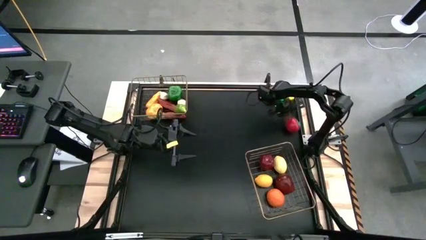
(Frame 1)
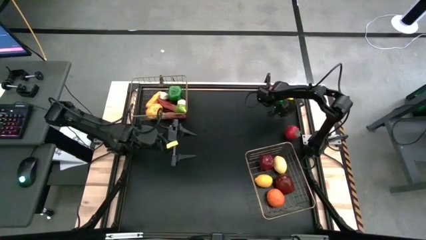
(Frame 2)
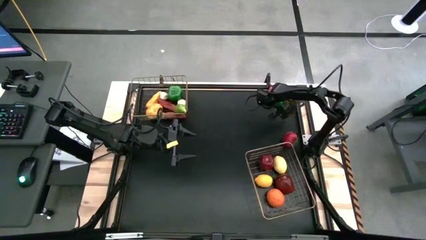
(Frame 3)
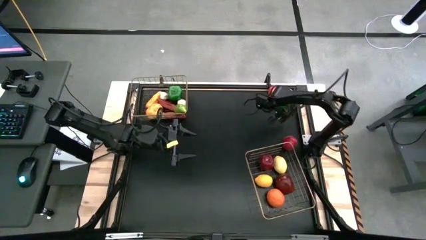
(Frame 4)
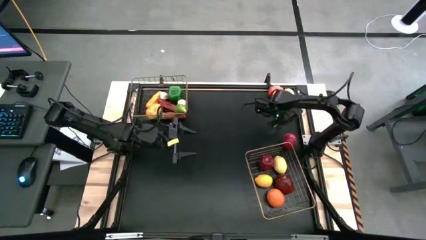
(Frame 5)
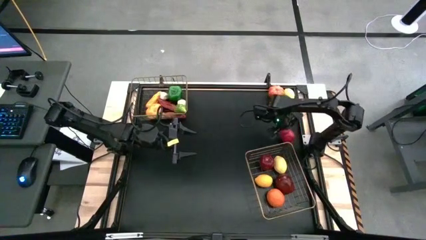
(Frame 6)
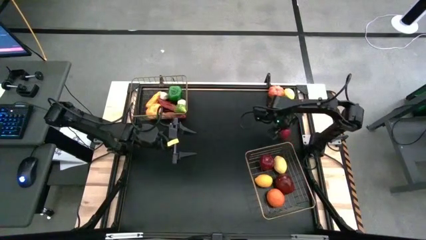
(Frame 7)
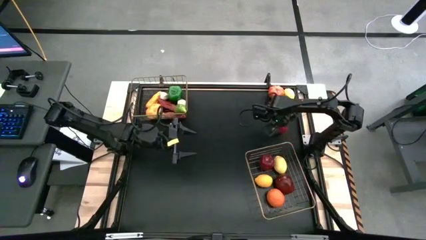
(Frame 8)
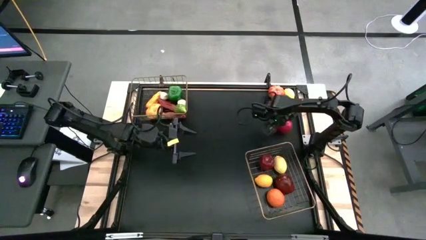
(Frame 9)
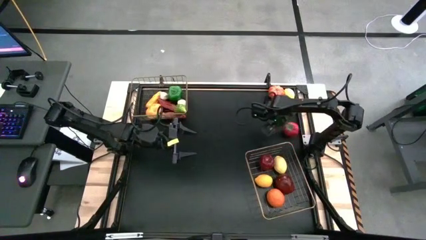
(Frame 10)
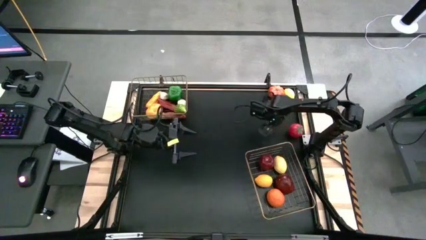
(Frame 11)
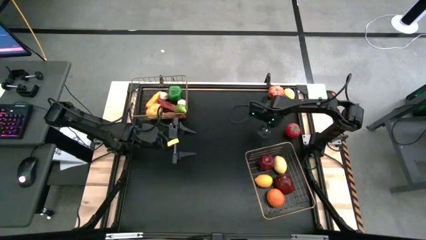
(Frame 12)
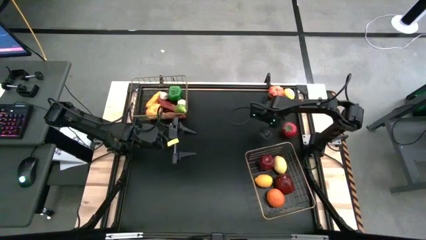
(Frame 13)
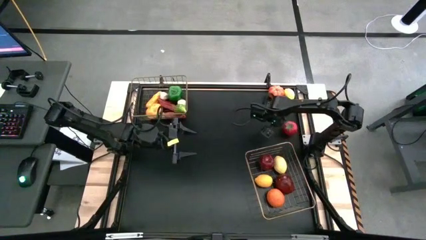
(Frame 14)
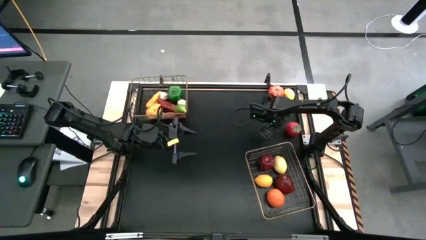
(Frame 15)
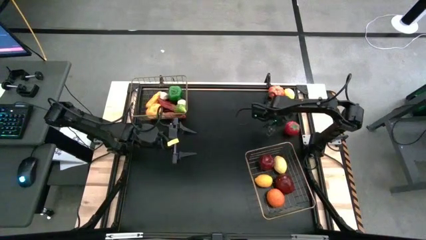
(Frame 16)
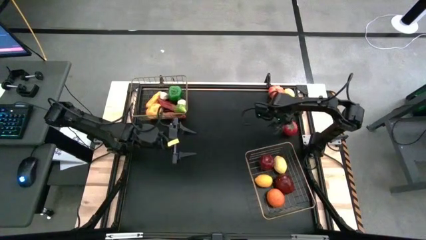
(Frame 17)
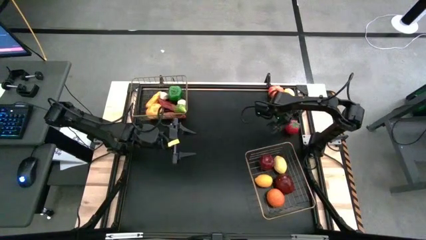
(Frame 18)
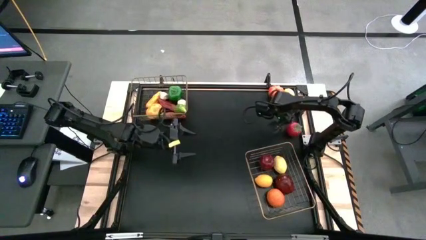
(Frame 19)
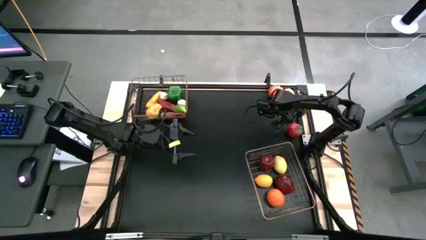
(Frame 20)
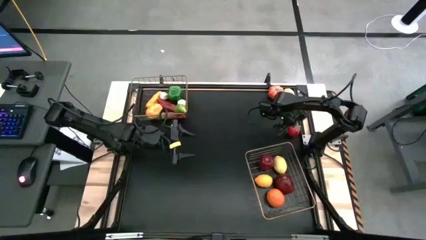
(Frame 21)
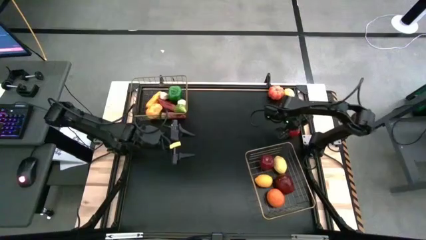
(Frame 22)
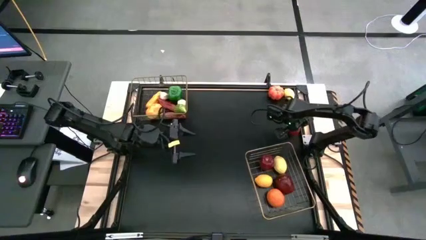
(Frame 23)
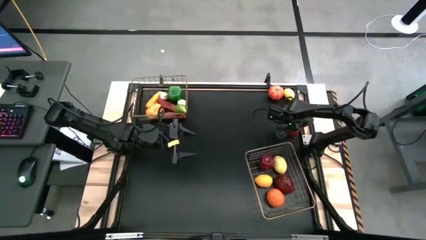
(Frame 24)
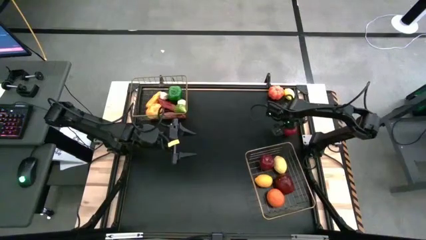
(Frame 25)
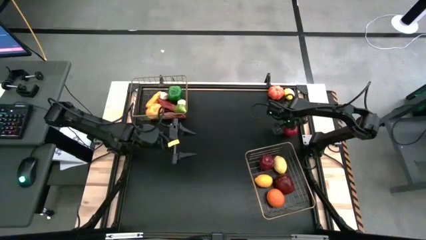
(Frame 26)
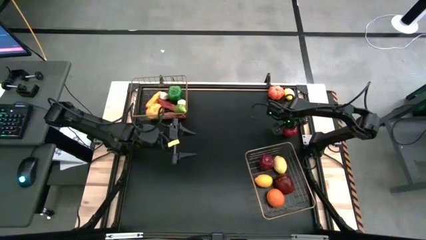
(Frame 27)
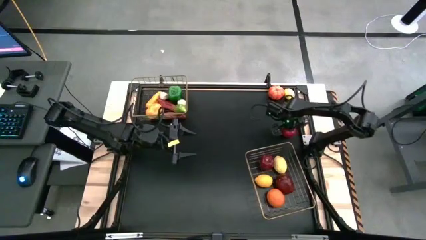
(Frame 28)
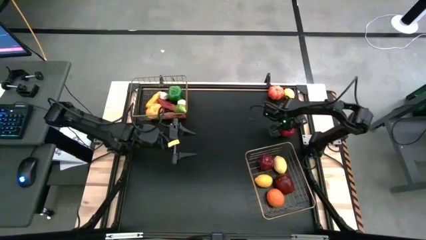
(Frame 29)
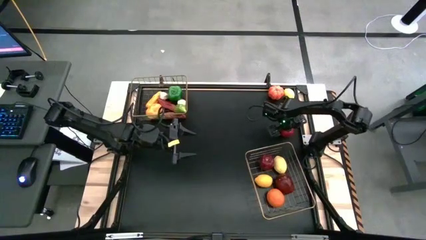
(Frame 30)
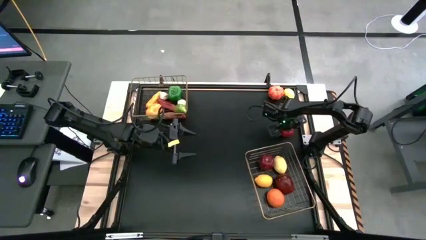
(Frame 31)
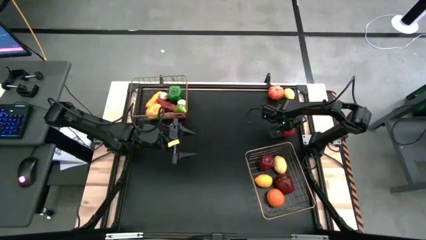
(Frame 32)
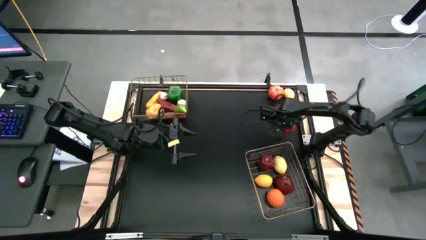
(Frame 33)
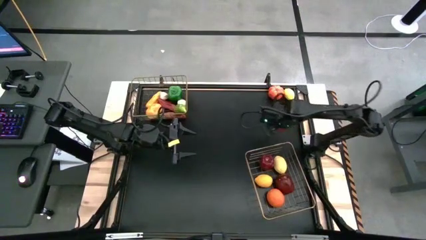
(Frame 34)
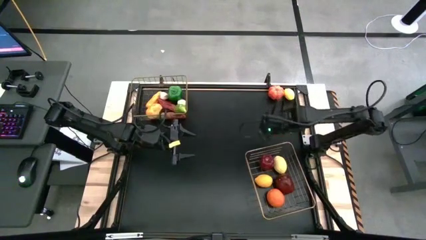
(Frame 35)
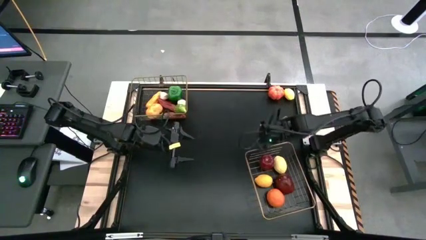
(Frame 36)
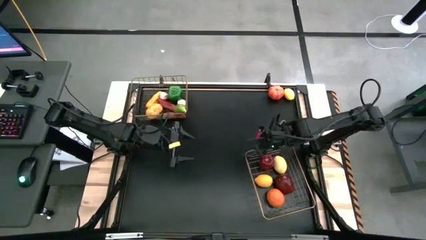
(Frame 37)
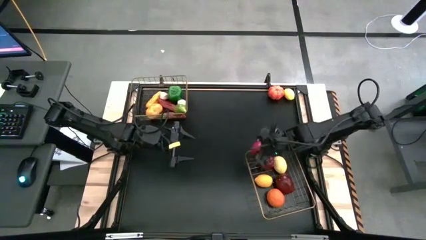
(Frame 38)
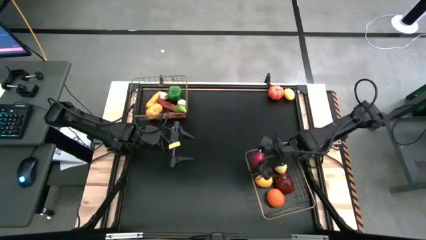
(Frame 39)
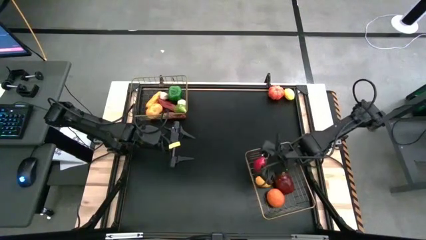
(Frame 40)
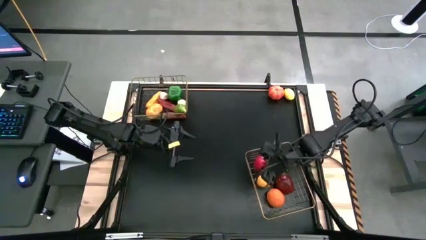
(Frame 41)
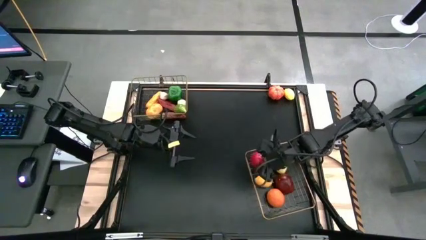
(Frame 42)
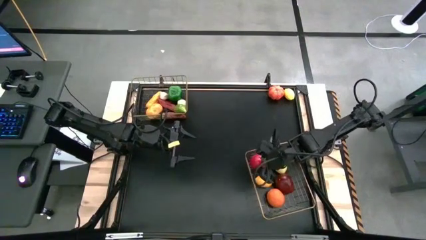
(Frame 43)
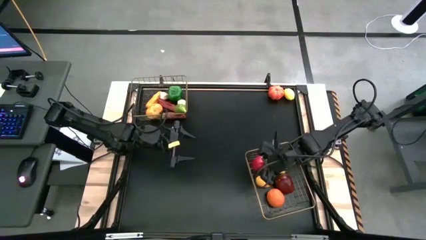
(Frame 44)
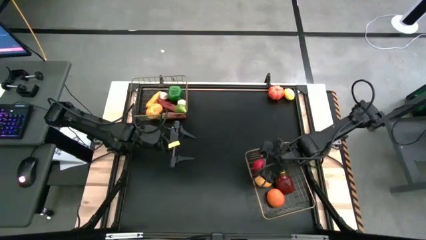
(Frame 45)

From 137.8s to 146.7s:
Task: Sort produce into baskets
Put the red tomato into the bottom wire basket

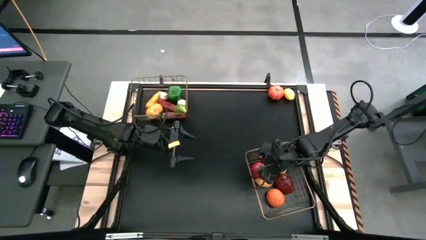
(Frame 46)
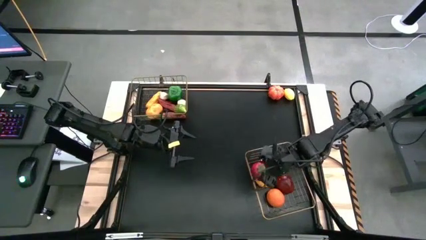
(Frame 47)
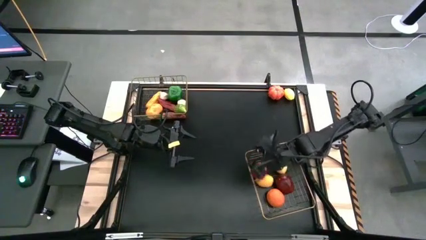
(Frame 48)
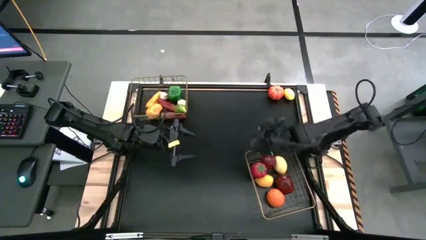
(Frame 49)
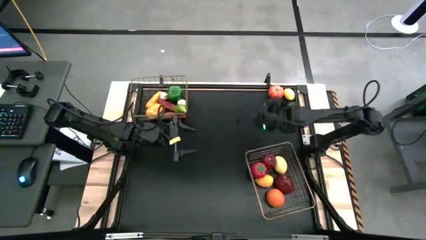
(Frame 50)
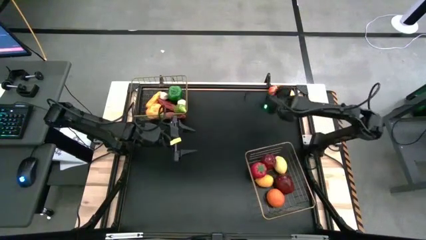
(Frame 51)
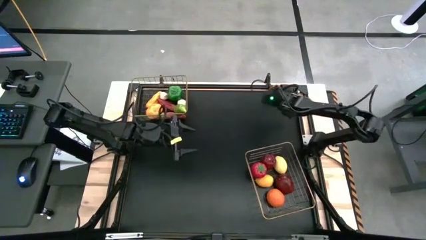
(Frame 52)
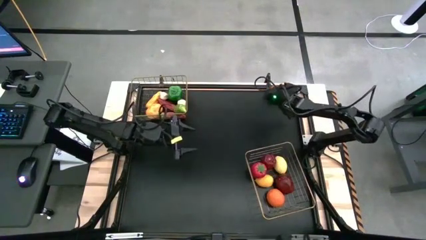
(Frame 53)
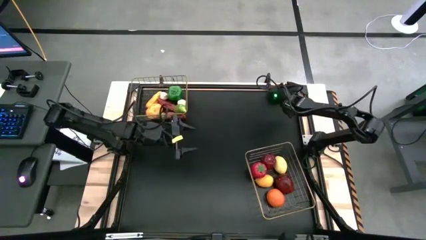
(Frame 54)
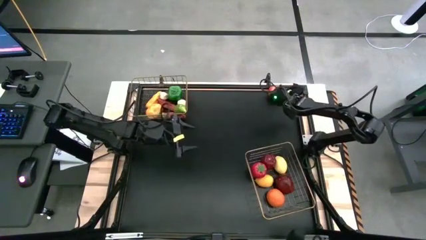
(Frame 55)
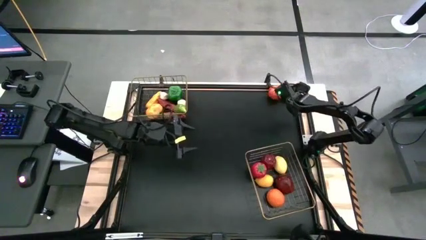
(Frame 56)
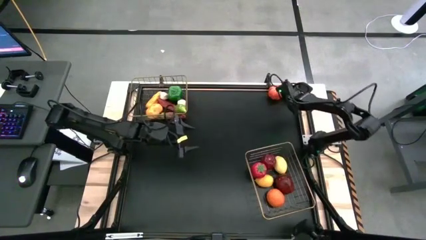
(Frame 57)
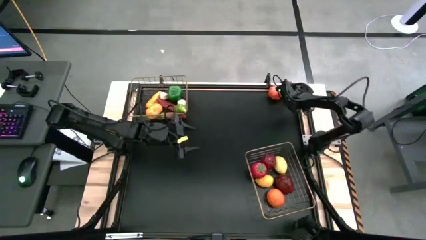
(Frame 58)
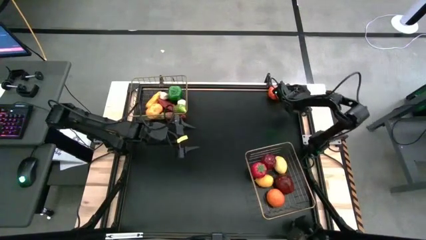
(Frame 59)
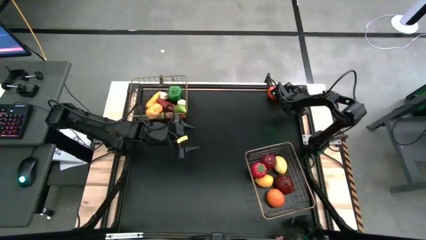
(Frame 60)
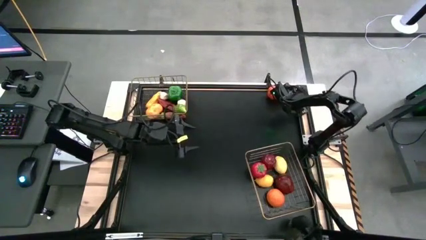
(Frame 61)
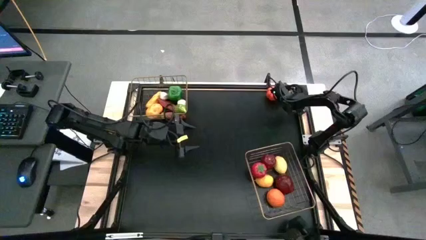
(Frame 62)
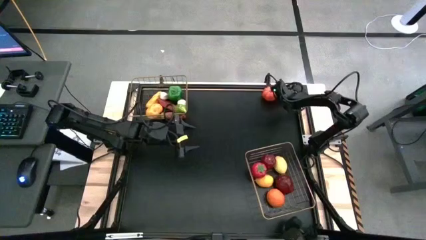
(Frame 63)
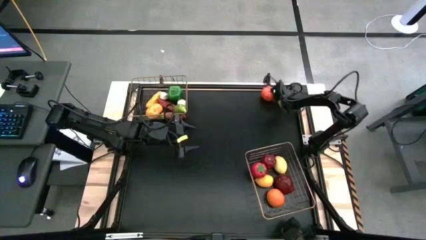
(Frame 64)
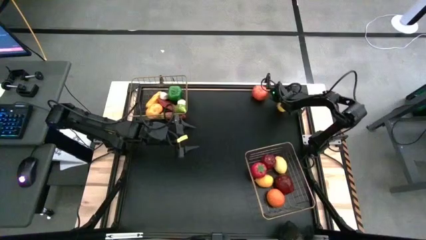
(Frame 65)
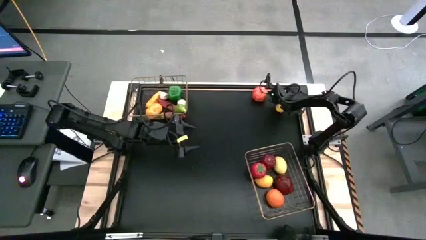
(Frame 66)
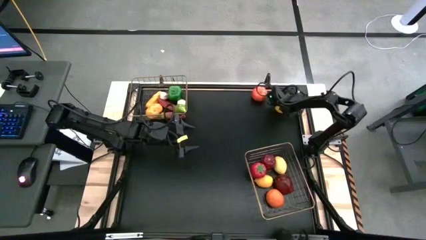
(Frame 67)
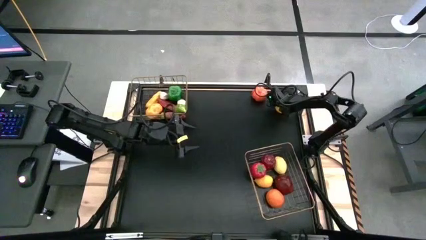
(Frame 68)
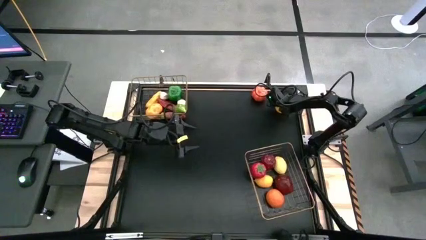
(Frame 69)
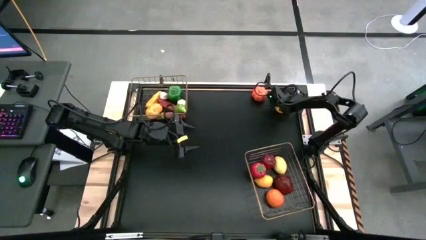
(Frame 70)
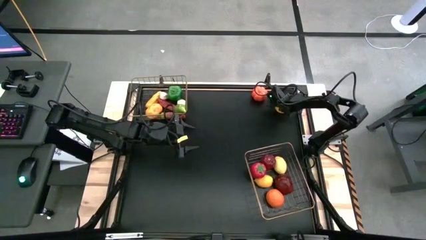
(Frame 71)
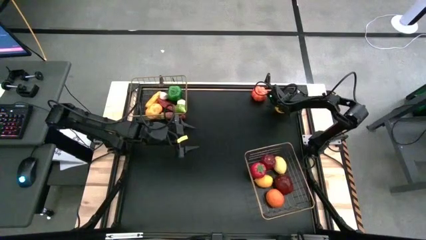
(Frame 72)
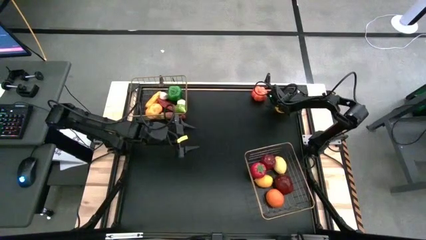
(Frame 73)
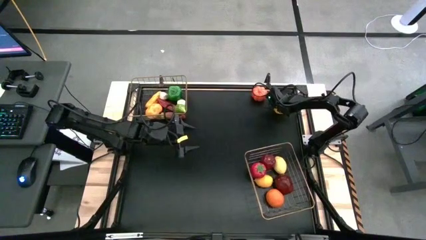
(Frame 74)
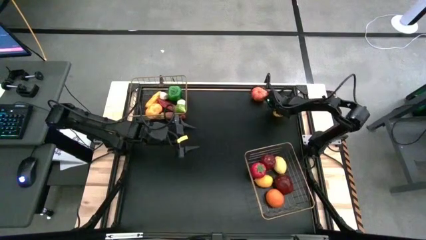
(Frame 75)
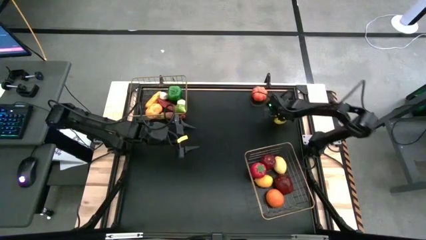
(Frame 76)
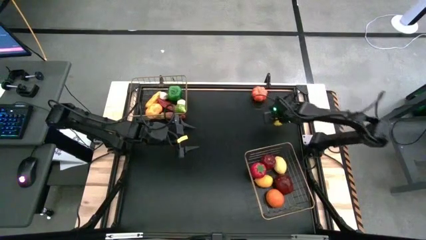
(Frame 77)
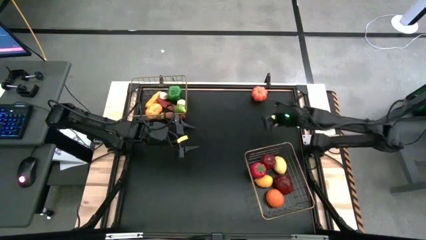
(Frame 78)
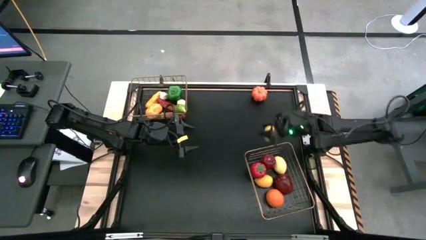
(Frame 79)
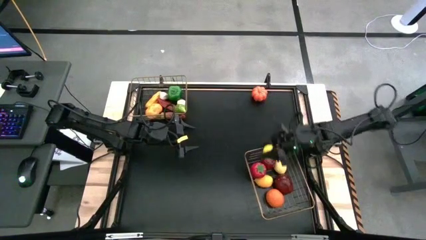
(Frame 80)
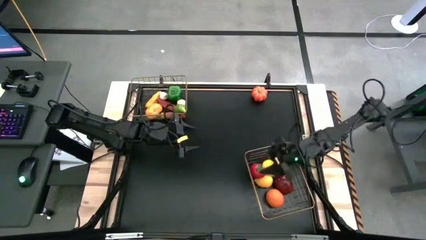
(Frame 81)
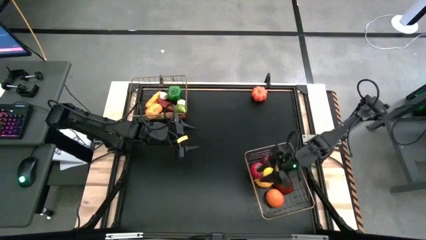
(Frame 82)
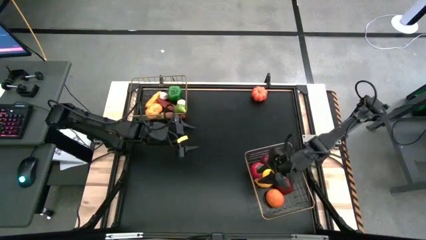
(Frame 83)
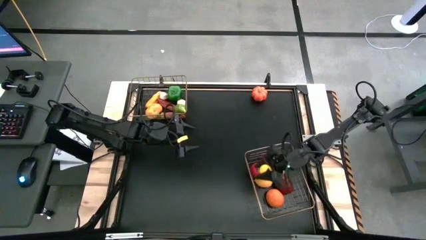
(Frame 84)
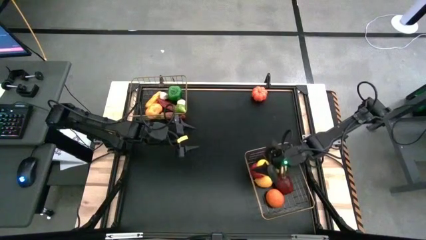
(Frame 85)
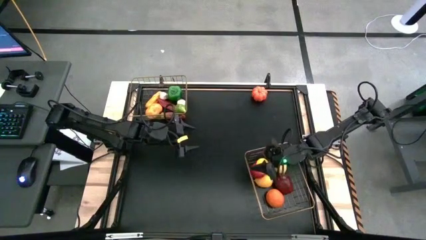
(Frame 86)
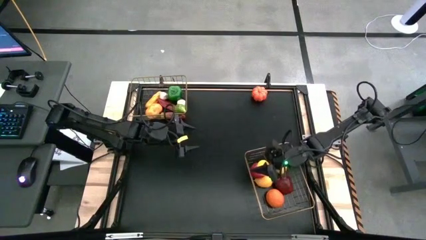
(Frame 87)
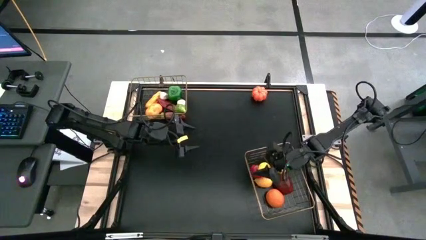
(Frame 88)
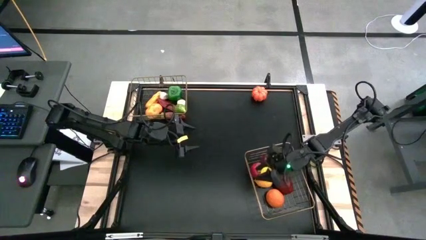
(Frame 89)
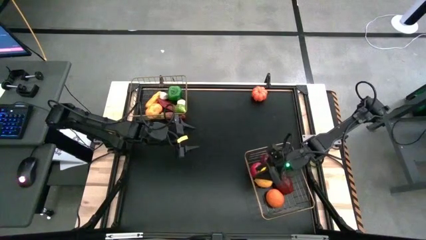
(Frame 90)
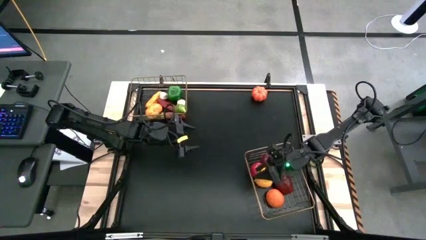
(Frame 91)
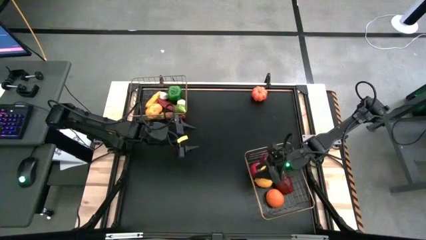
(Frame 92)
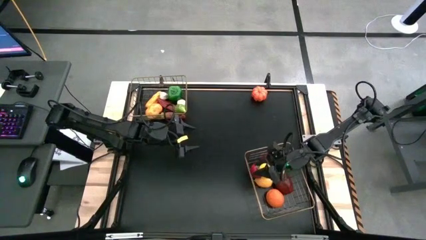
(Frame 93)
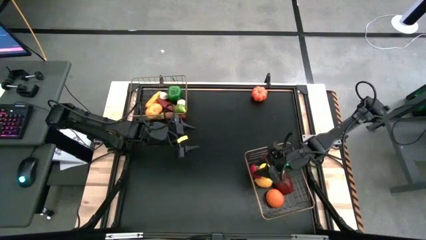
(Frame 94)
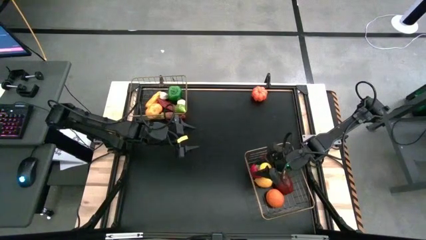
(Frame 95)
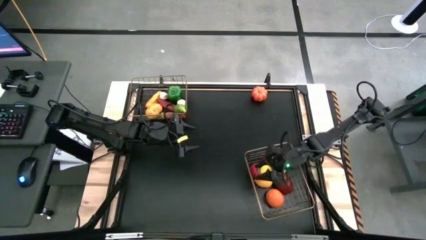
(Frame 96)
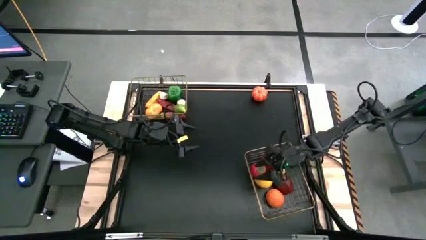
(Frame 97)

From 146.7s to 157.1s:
Put the yellow lemon into the bottom wire basket
